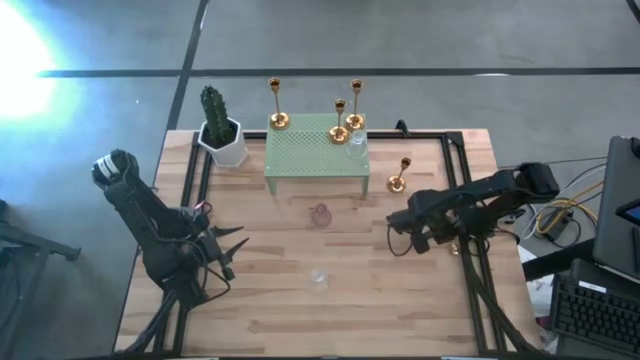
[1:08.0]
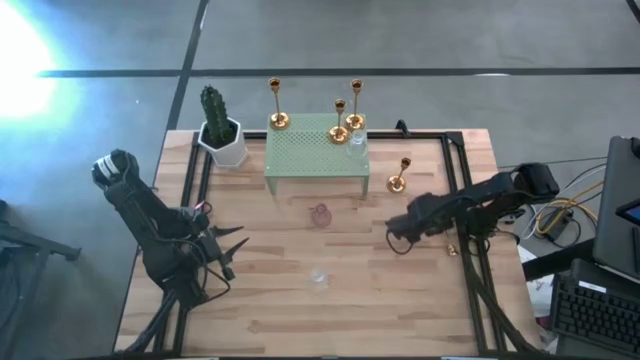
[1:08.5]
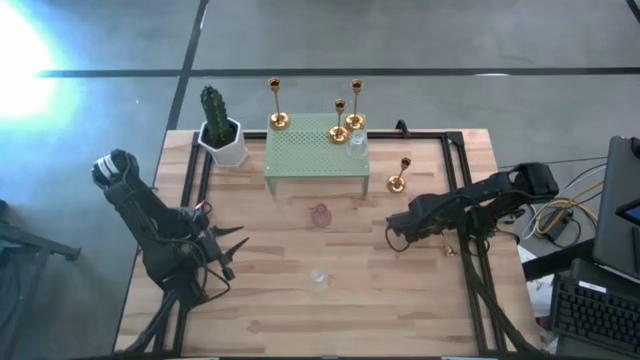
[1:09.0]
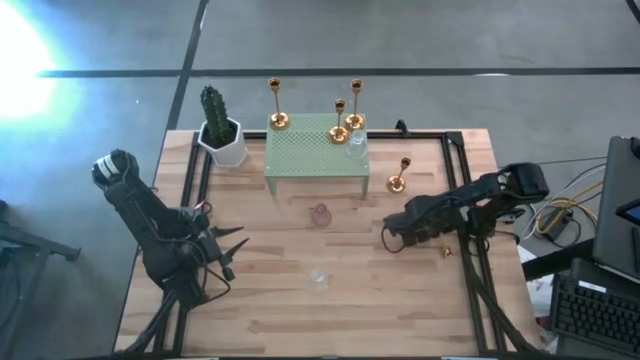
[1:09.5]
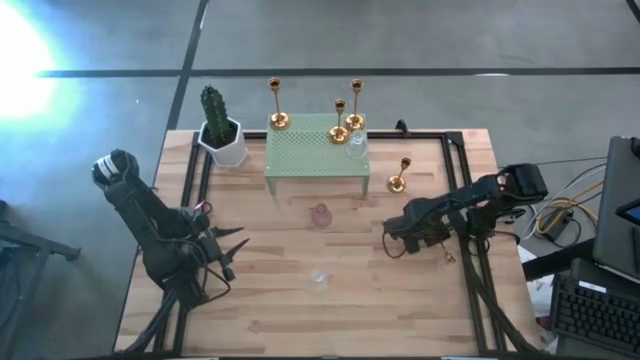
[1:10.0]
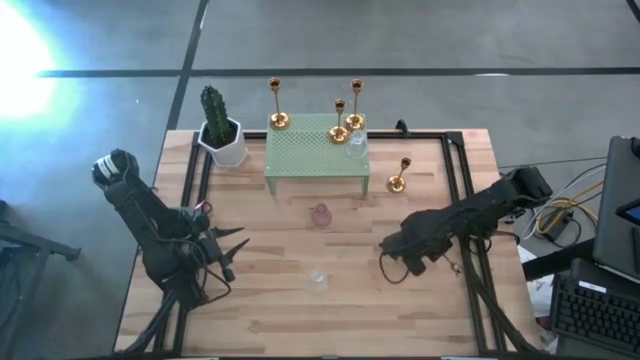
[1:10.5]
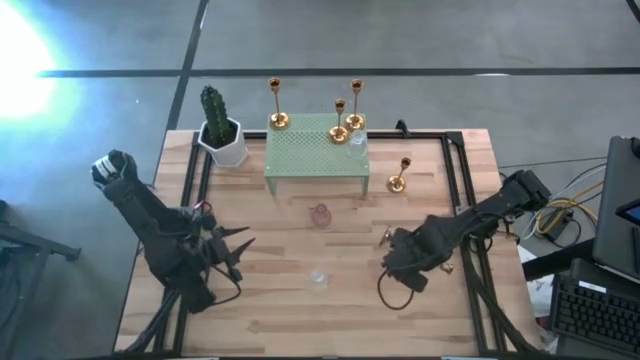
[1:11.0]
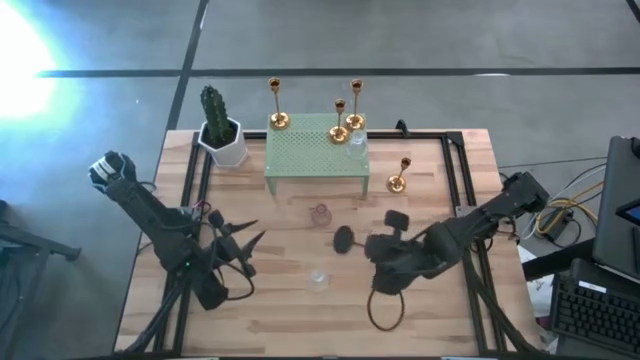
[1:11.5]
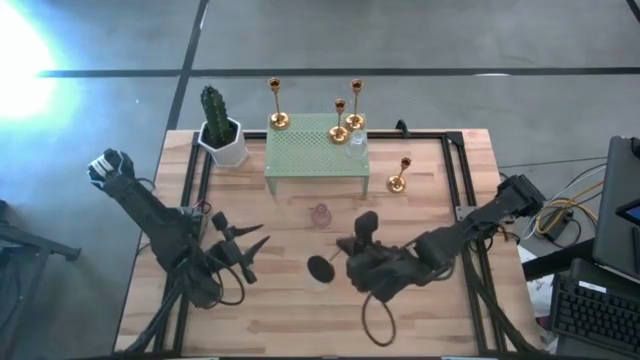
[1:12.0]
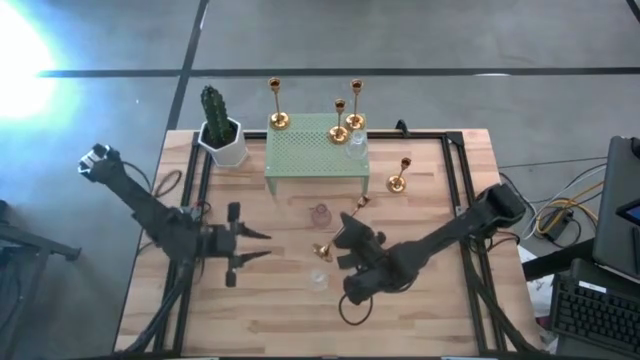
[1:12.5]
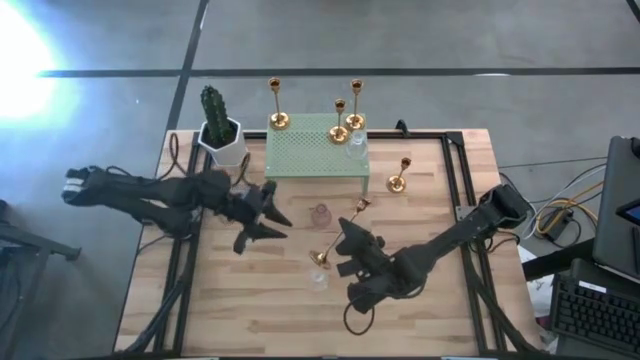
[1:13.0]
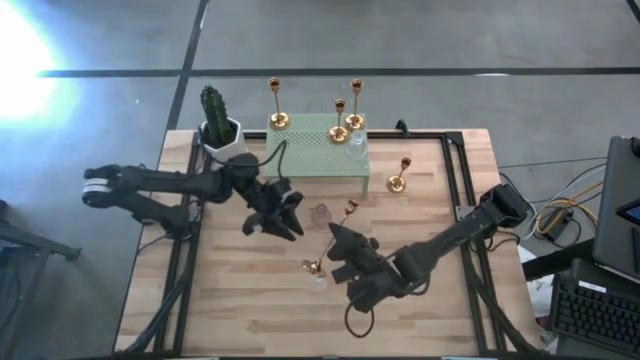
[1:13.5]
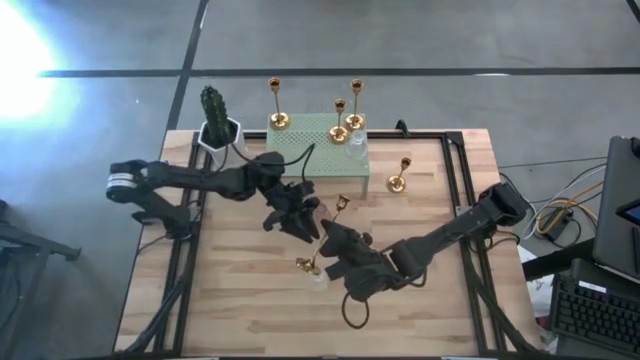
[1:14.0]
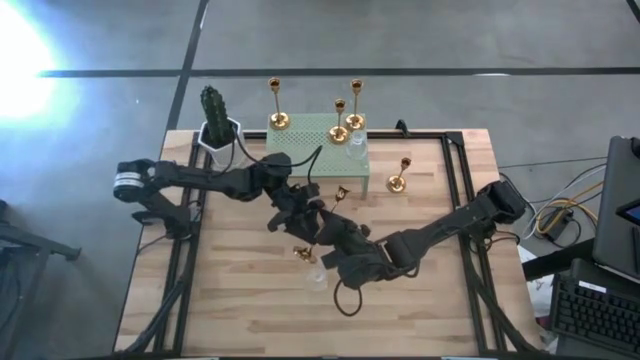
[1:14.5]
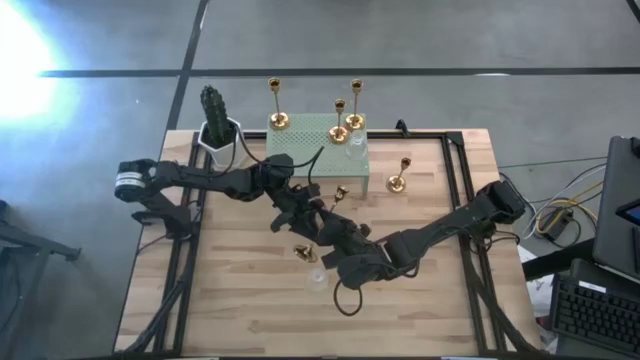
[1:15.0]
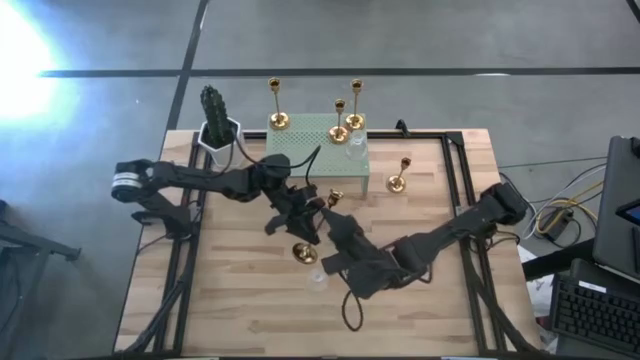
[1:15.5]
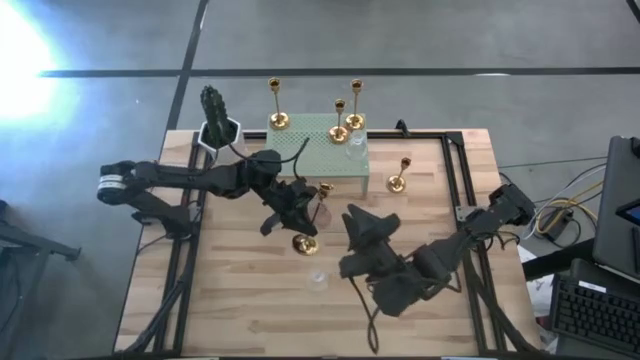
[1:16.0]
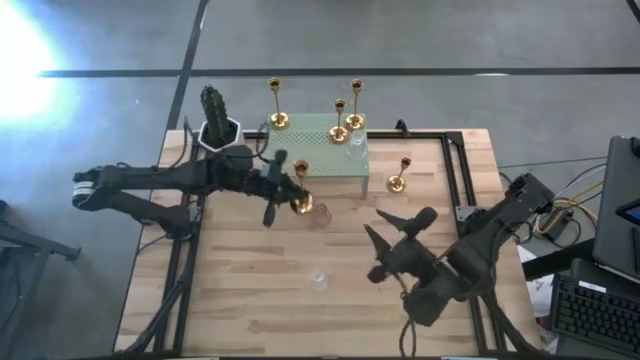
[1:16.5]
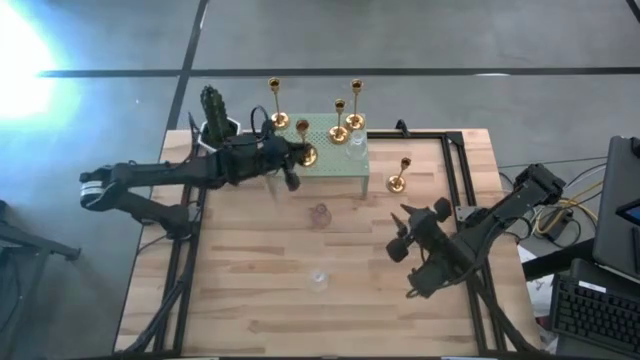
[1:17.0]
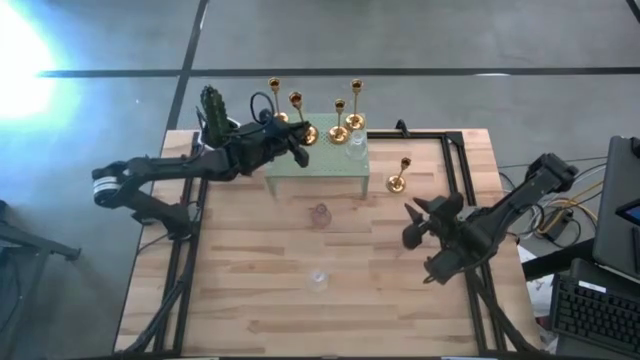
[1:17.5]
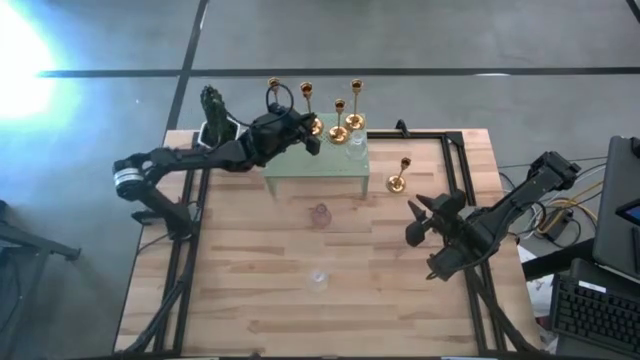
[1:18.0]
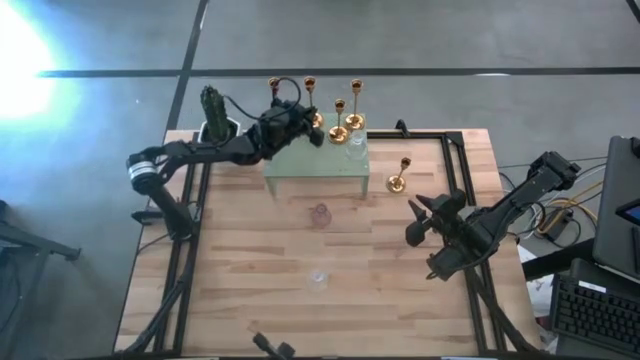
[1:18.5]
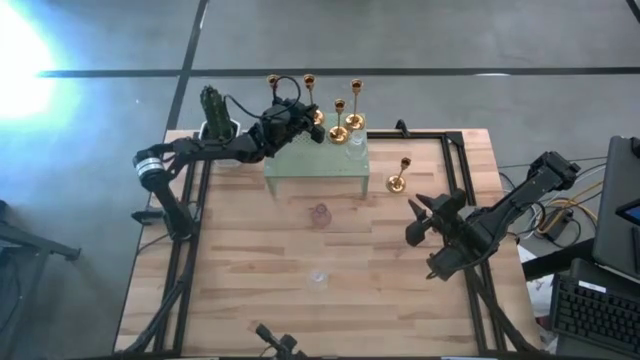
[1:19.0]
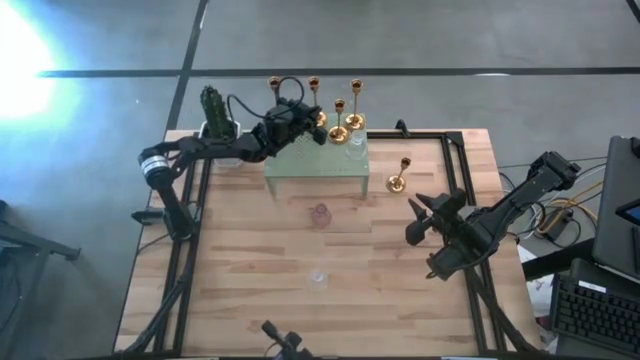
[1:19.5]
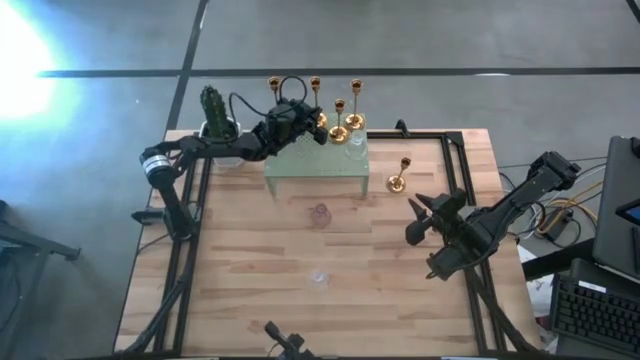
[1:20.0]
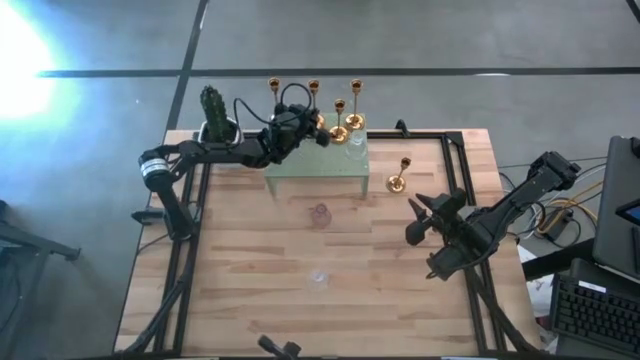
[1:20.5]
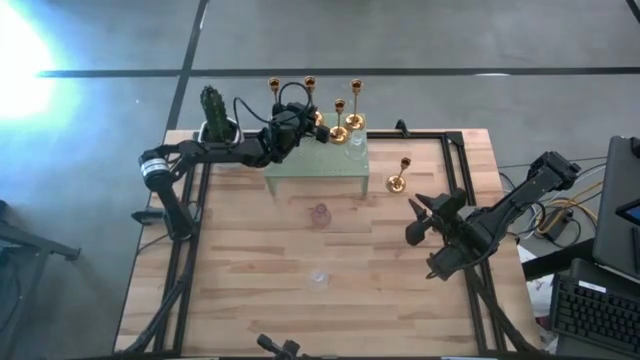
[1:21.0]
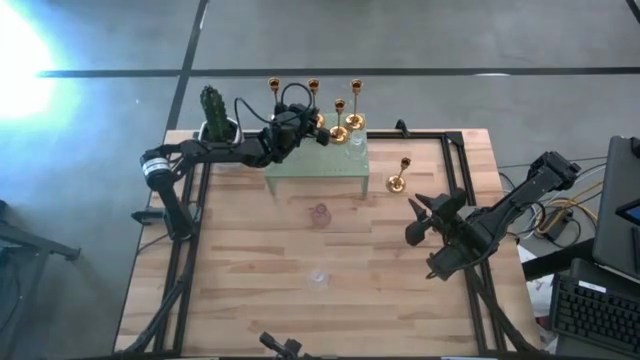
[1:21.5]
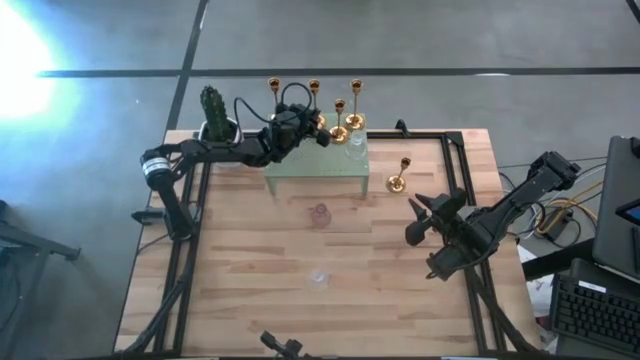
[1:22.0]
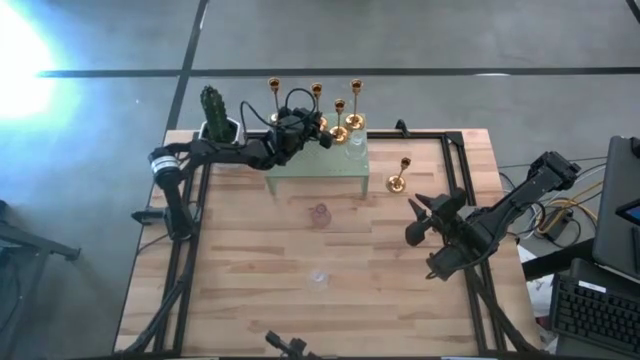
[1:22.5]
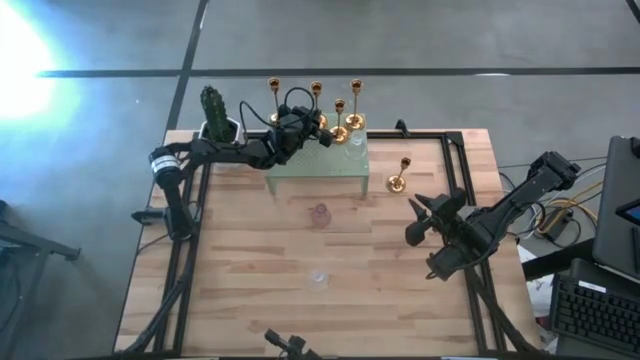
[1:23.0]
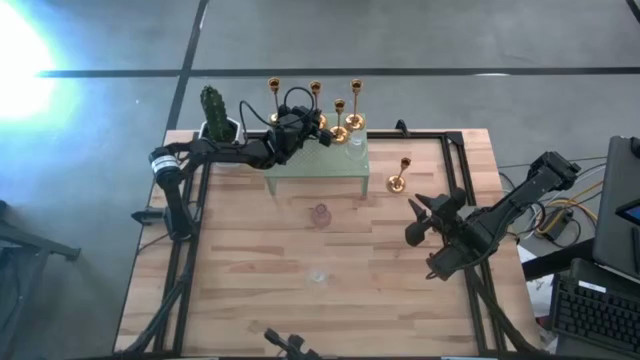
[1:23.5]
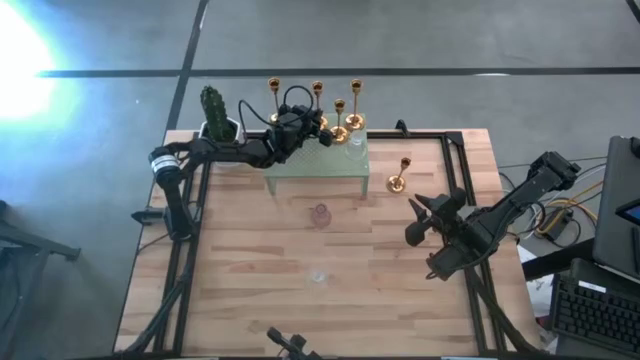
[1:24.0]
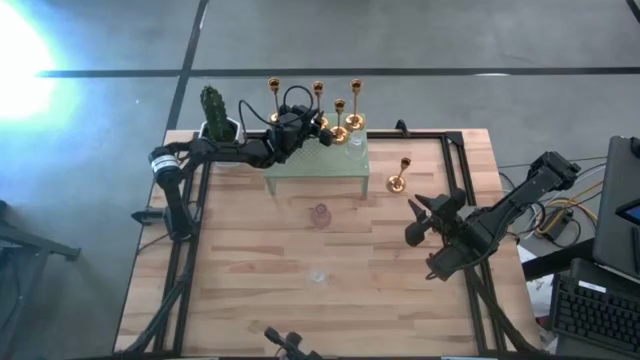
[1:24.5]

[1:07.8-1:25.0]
Task: Pick & Place candle stick holders
Put the gold candle holder on the shelf

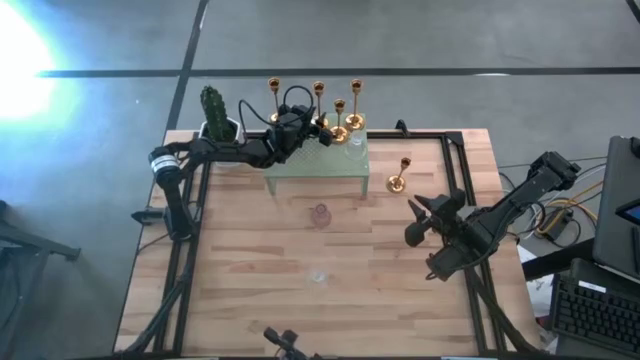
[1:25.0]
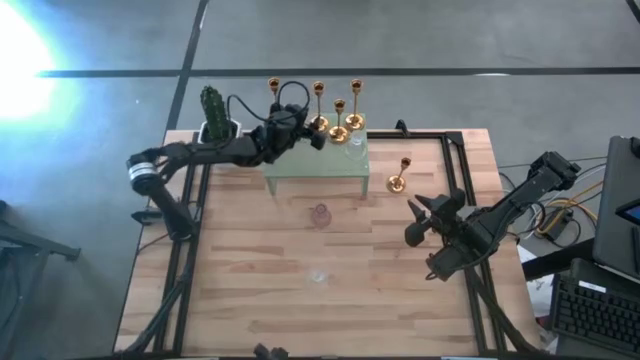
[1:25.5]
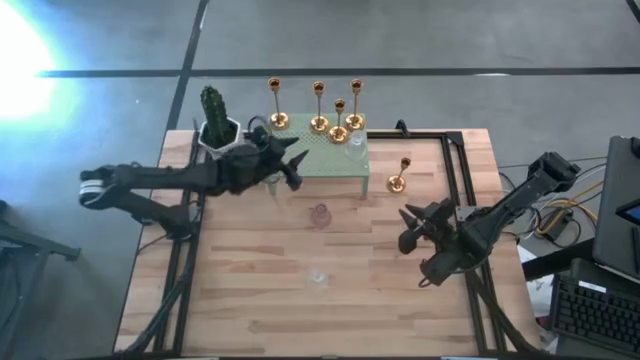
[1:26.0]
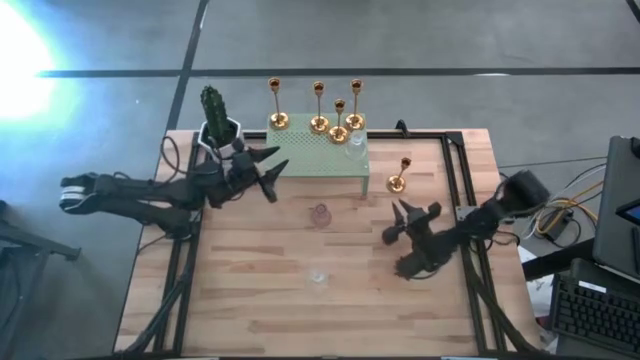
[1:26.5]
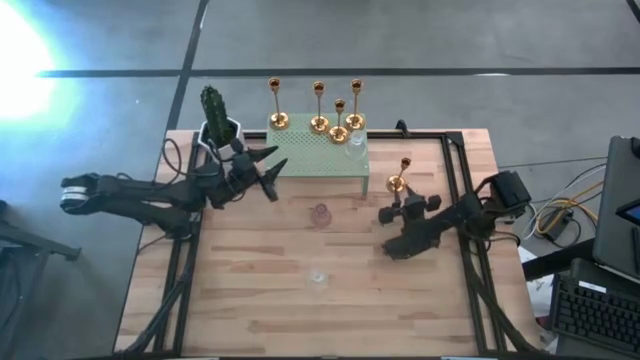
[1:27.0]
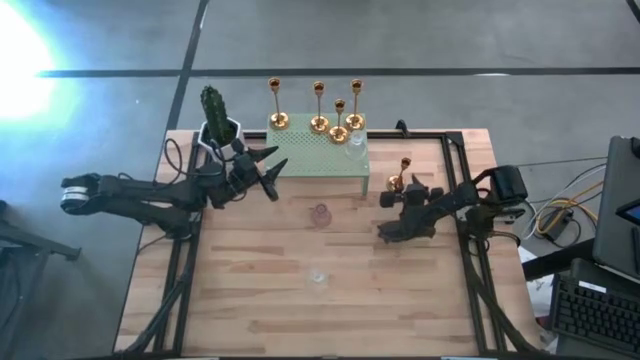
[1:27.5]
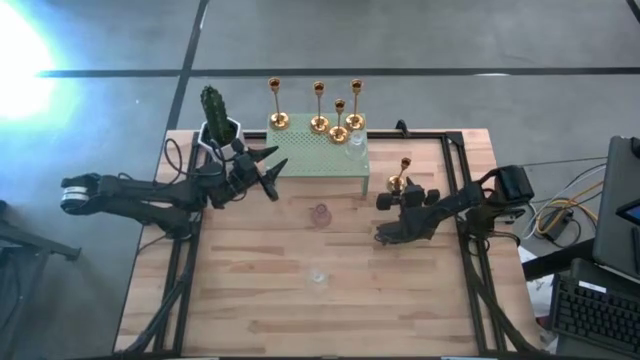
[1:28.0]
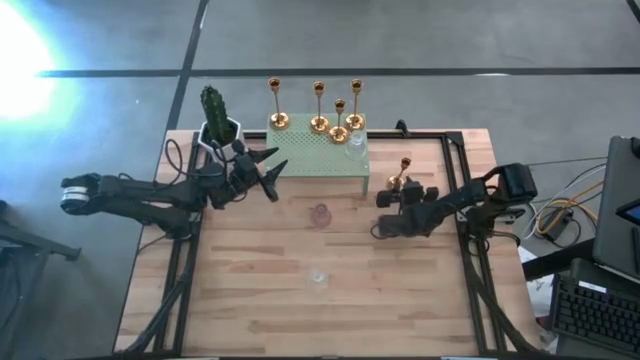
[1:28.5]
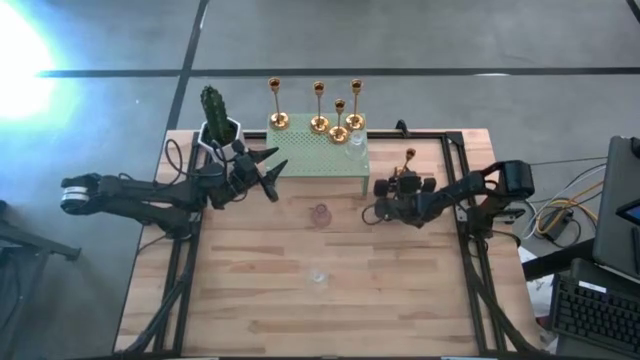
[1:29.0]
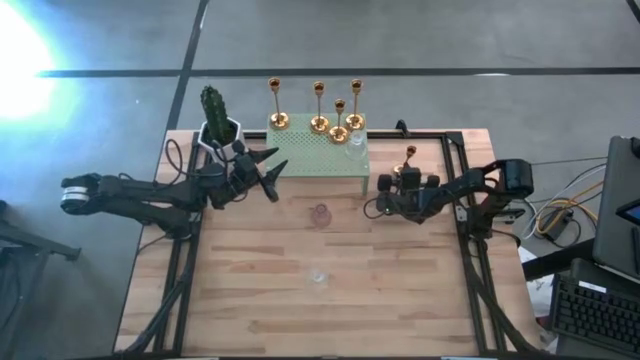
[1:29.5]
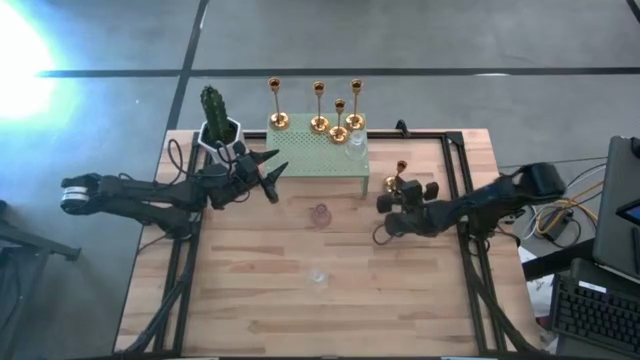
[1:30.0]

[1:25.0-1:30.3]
Put the gold candle holder on the shelf
